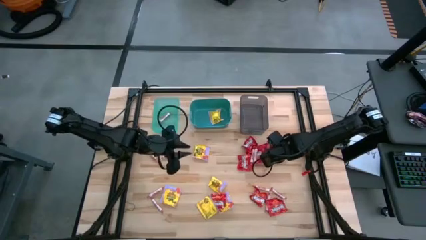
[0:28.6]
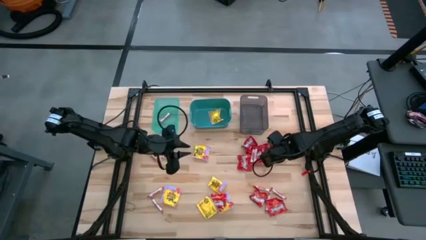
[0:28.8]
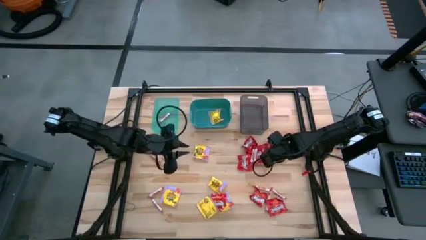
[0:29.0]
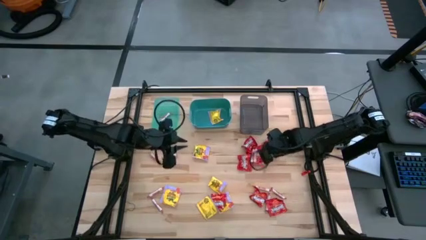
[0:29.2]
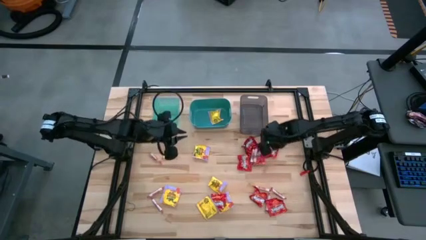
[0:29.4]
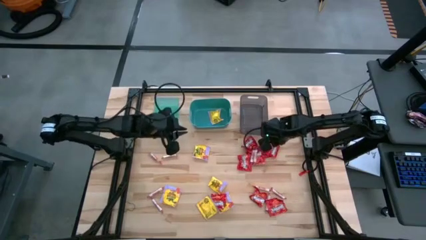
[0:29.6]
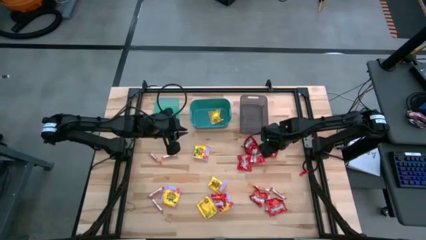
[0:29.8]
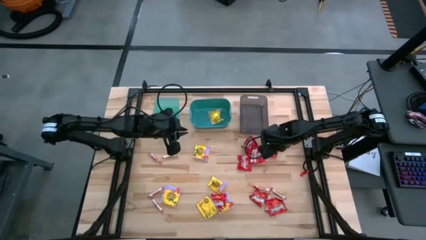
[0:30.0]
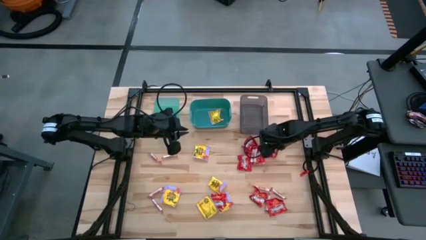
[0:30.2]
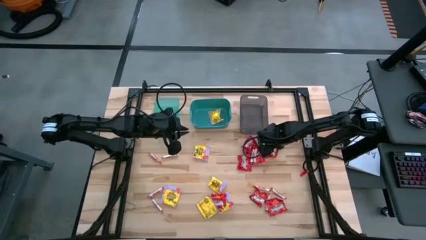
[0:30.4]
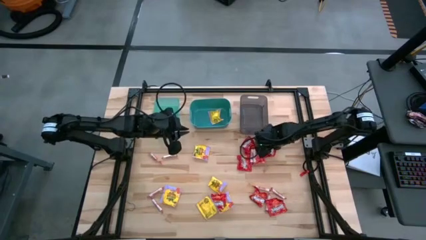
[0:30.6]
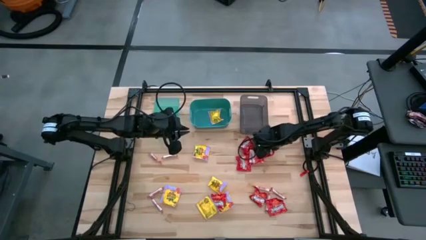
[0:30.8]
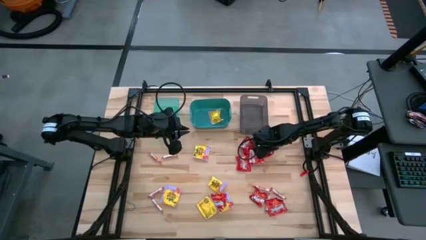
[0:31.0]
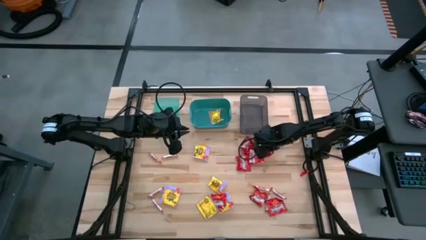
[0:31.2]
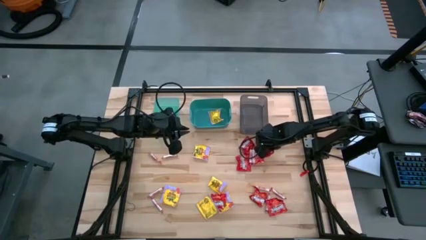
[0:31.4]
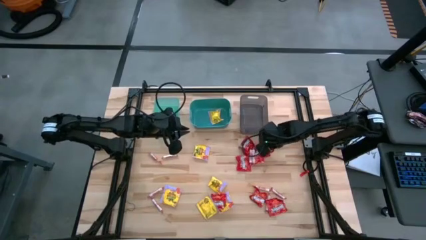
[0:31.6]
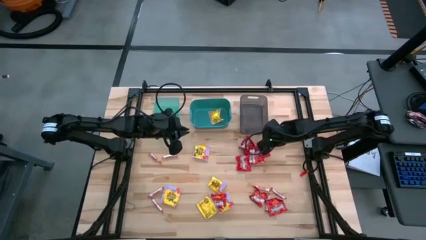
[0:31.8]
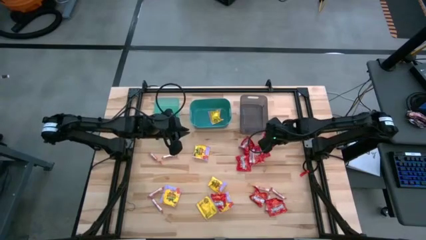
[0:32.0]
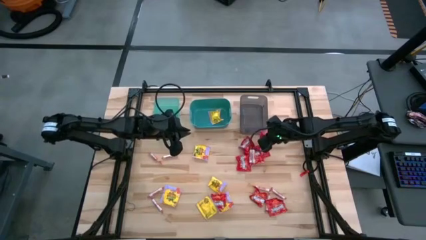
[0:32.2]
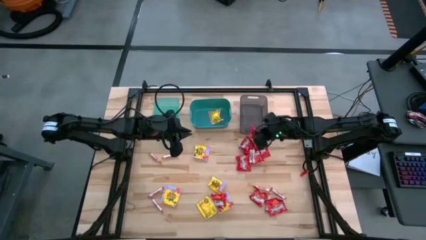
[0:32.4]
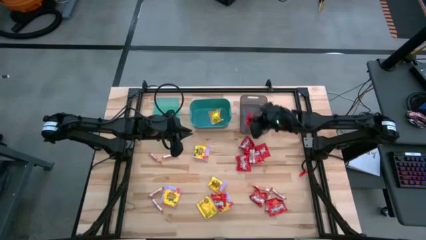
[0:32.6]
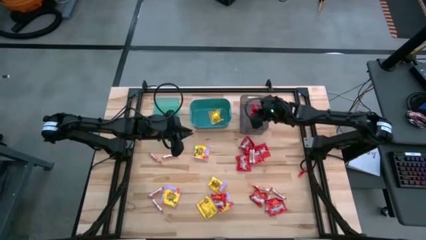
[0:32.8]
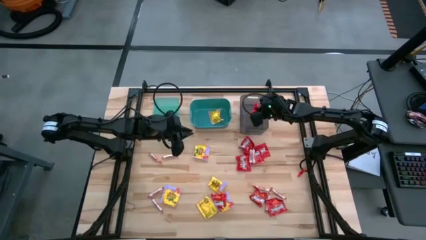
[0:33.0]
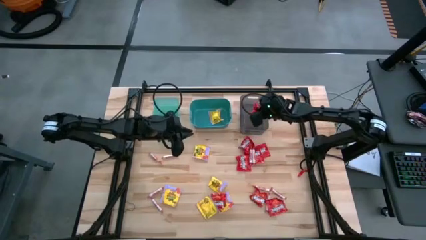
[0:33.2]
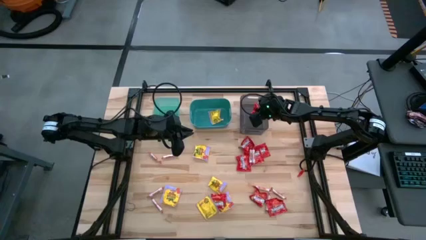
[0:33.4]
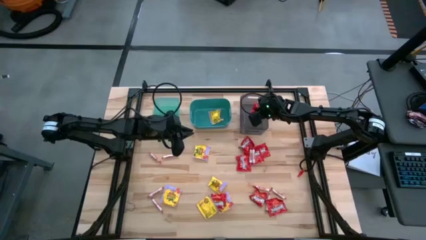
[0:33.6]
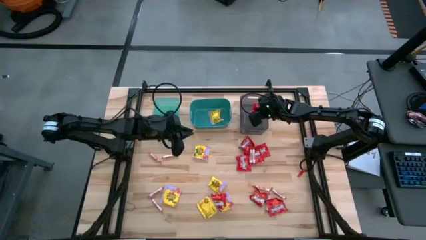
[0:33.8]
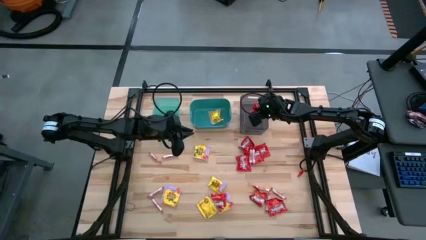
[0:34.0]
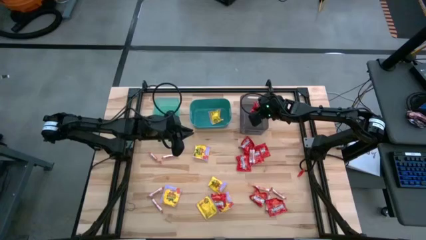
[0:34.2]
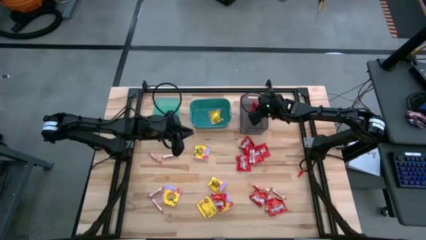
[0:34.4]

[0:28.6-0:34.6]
Task: Sort candy
Put the red candy into the black bin

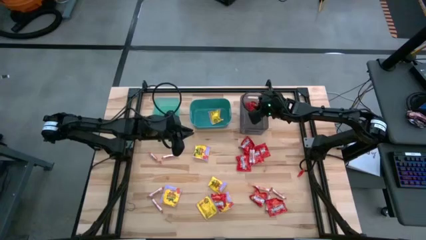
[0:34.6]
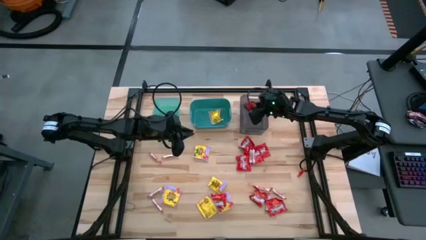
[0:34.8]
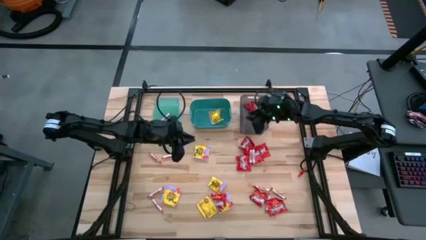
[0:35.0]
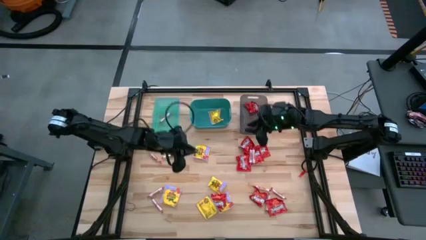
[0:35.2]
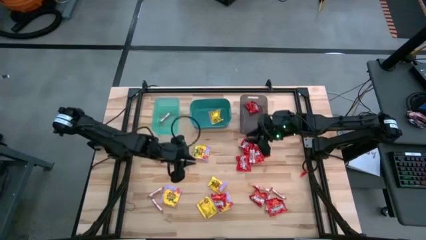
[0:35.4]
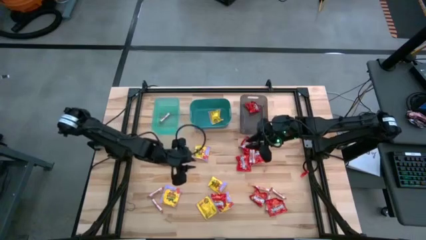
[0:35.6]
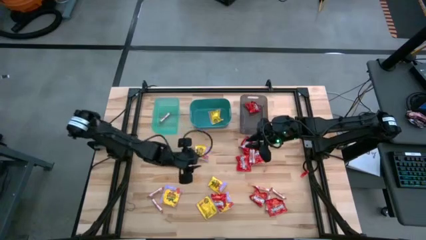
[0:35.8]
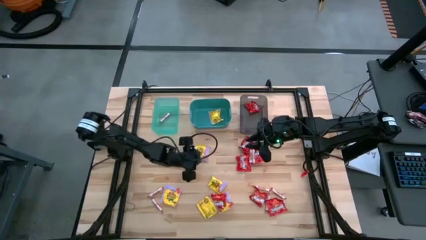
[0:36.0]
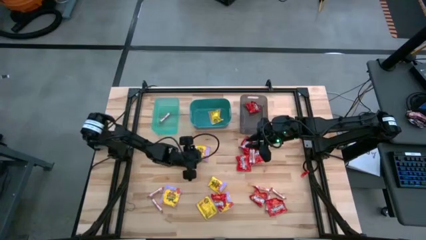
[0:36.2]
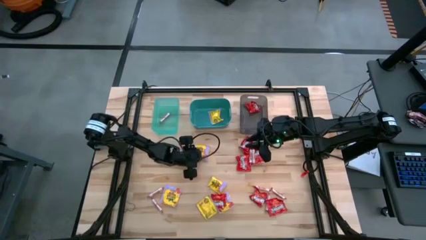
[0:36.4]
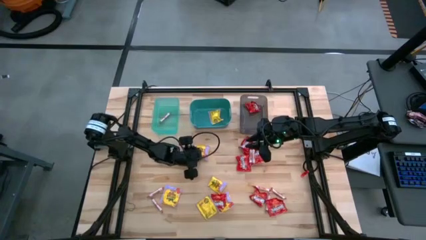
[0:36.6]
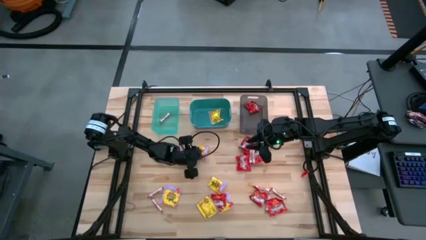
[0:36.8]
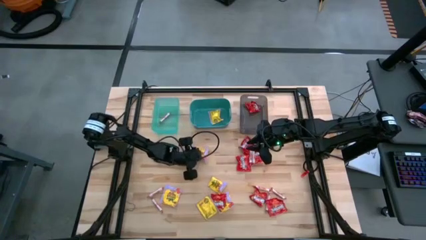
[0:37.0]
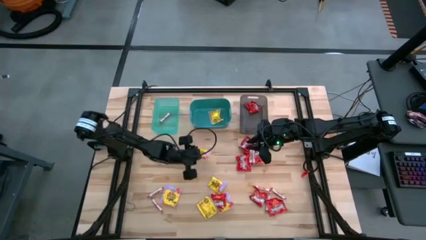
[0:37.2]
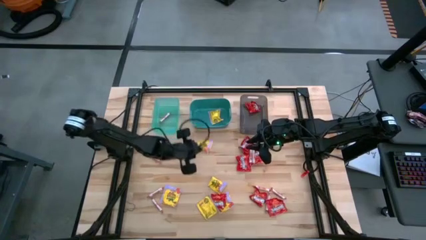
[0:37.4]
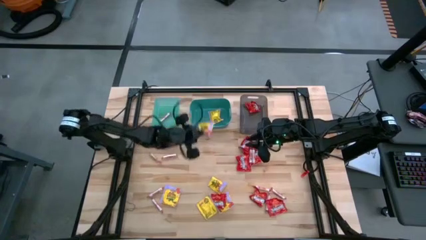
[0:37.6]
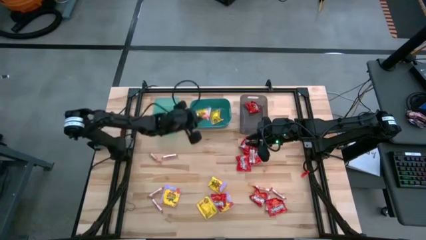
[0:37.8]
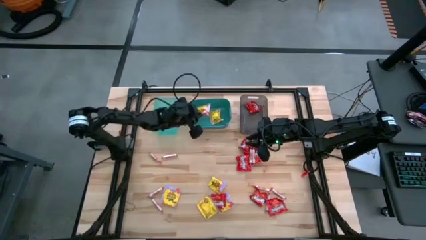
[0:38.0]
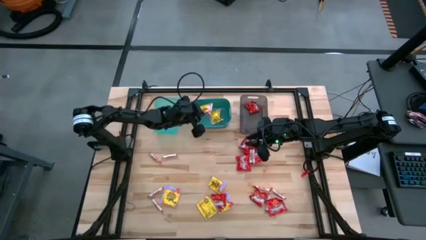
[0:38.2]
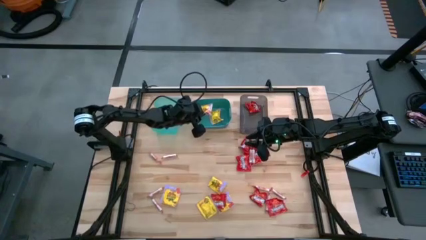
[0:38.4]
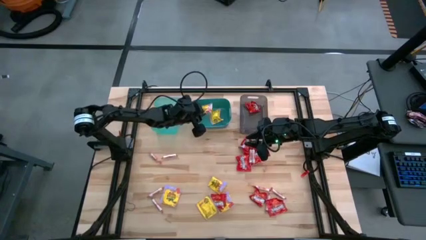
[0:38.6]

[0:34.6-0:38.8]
Put the yellow candy into the green bin

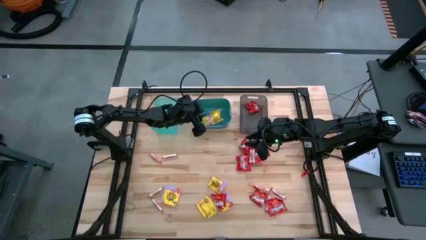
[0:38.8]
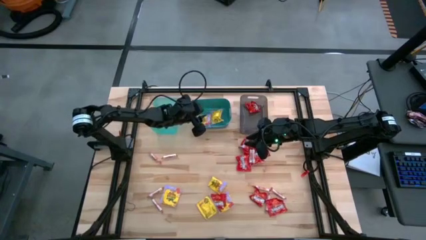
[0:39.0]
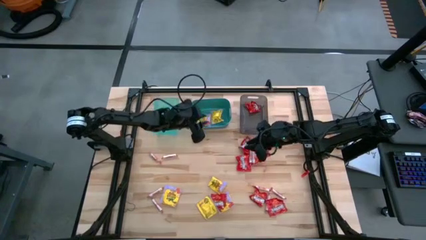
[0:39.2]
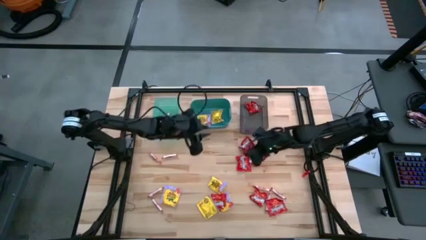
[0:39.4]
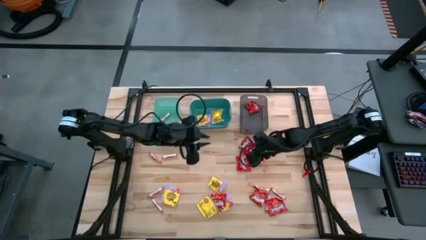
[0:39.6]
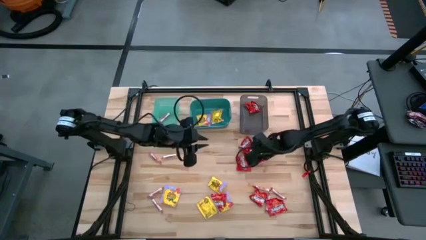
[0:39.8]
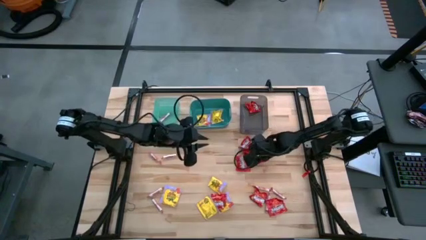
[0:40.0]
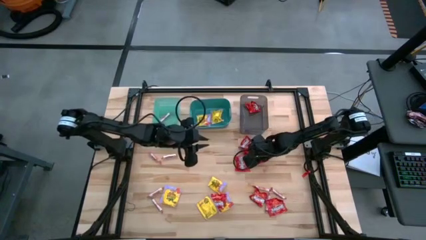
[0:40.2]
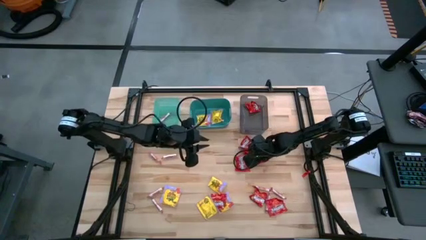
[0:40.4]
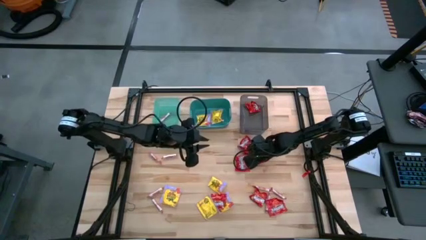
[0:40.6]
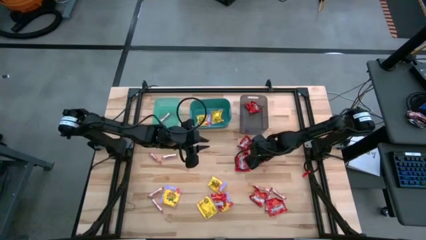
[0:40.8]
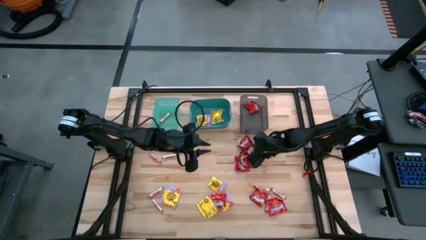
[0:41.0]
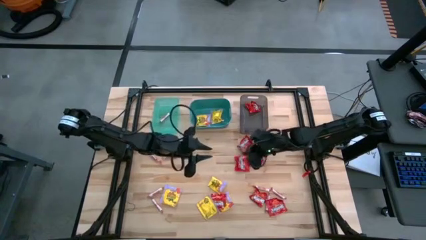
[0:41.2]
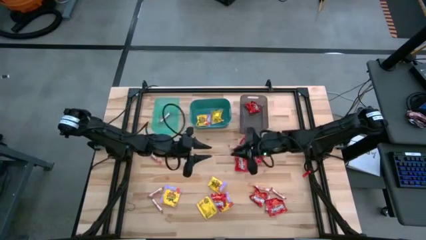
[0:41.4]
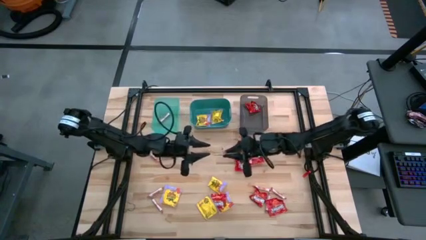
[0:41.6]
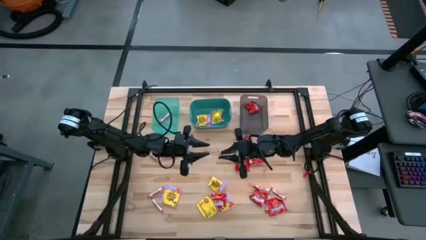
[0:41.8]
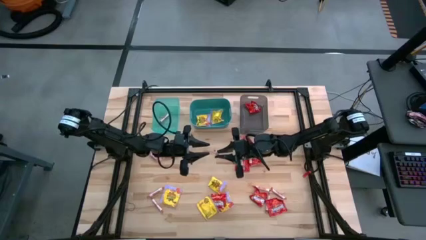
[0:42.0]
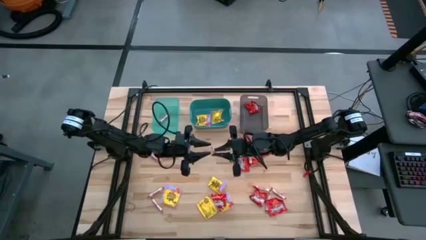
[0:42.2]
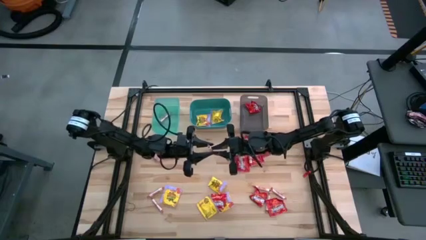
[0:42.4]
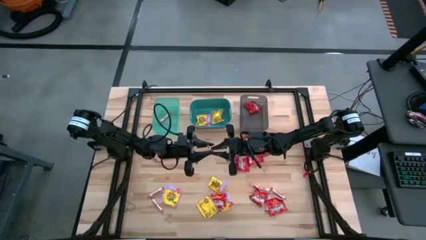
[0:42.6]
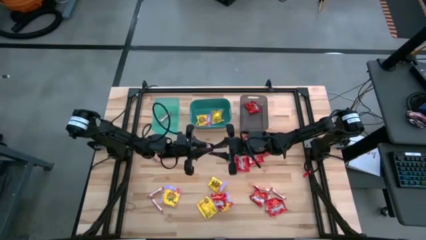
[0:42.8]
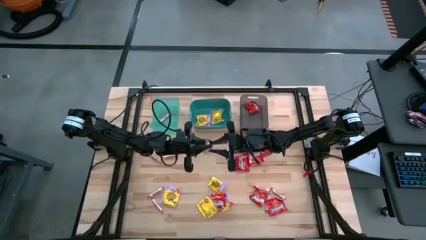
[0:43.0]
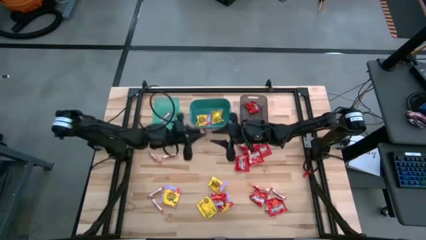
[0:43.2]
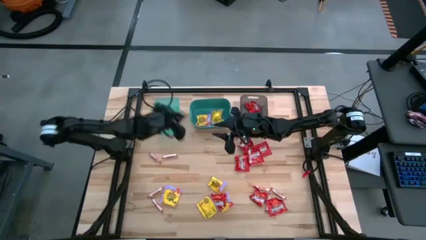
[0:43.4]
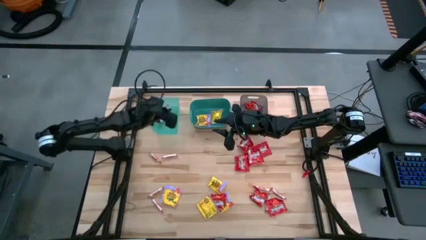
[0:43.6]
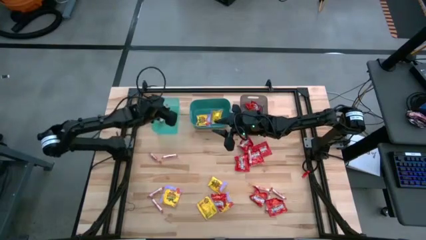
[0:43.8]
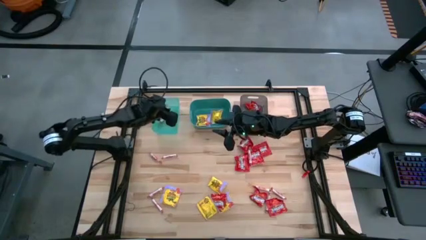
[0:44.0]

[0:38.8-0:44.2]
Put the white candy into the blue bin

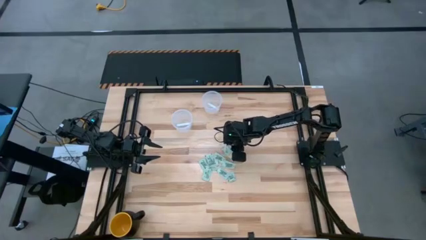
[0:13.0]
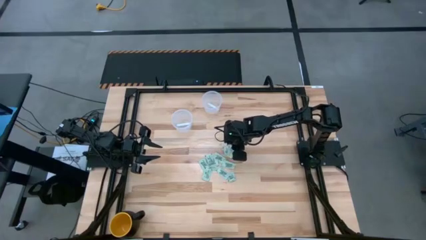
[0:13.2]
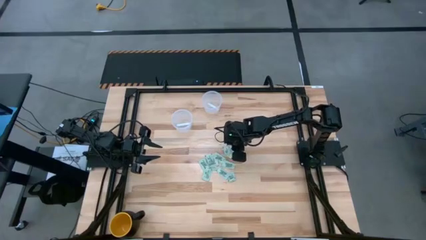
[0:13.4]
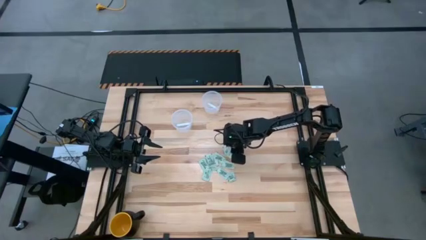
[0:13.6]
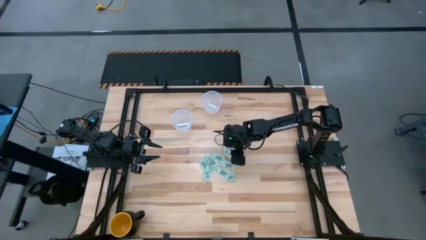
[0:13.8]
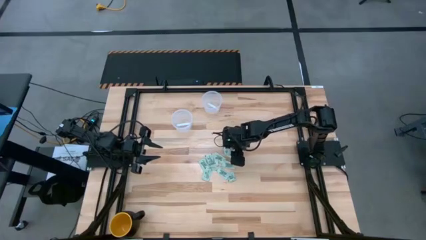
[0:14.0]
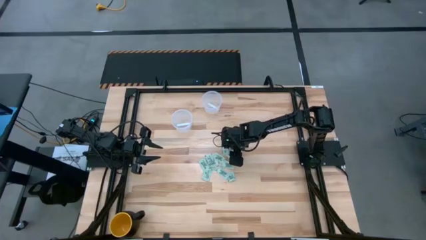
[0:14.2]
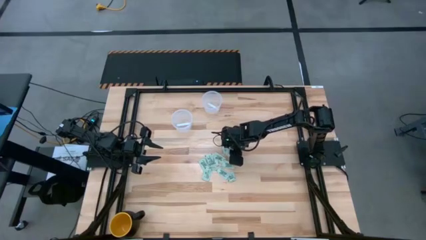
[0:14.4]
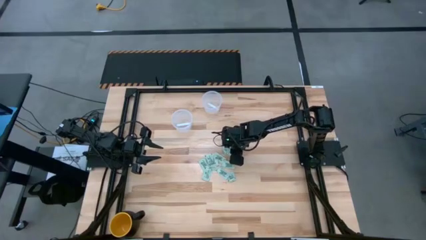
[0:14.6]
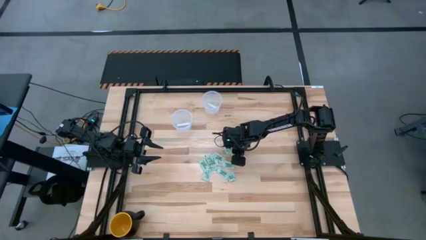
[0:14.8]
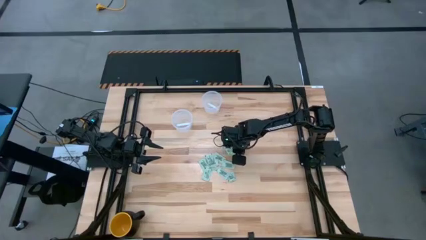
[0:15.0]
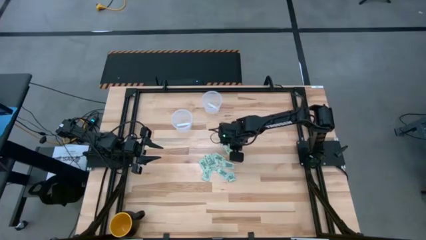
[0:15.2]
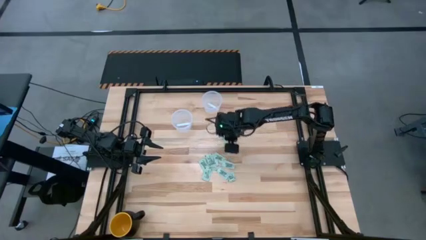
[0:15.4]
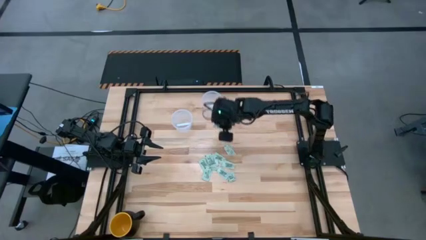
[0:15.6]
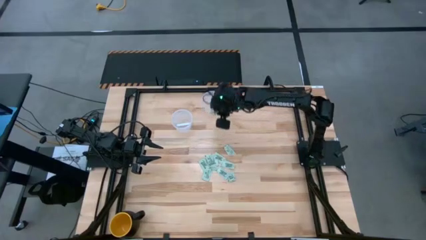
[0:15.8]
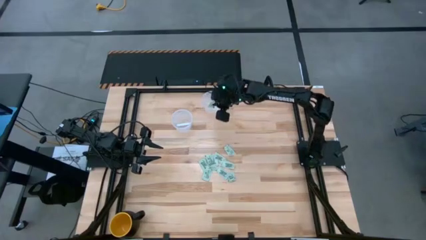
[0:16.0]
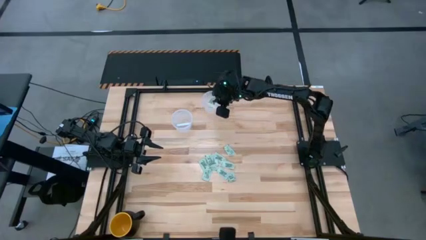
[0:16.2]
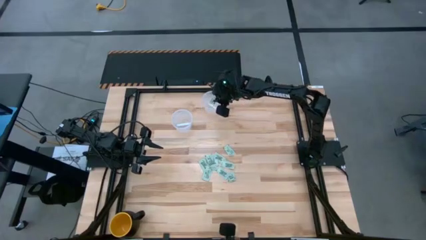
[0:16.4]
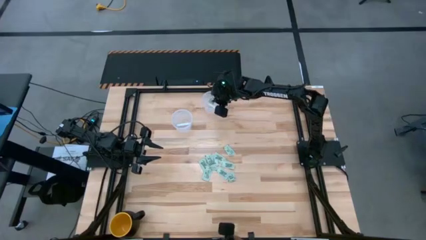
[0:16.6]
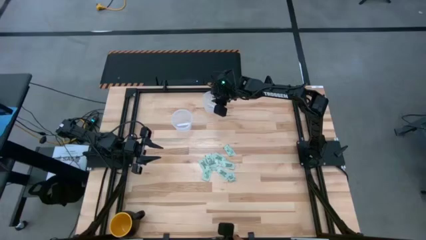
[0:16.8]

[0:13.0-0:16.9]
Task: Pick and place items into bin
Put the stevia packet into the top transparent bin
